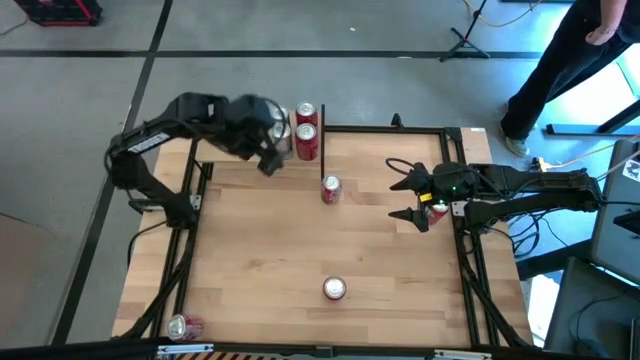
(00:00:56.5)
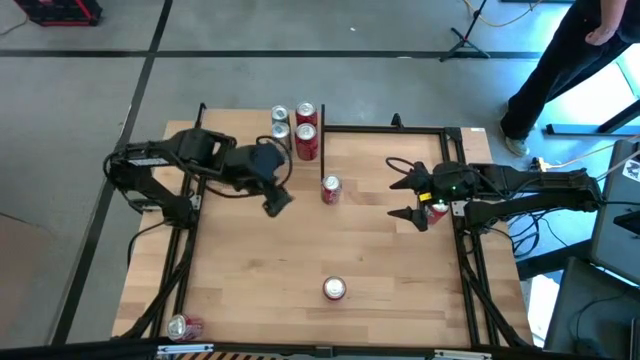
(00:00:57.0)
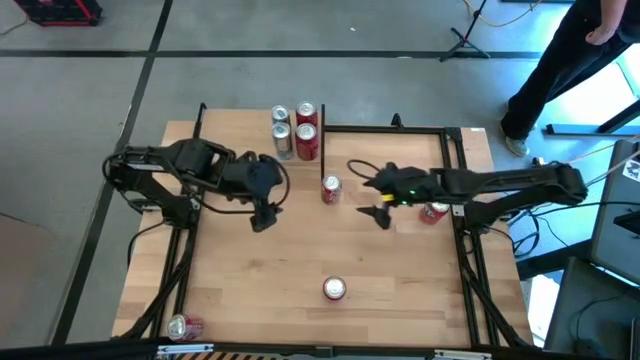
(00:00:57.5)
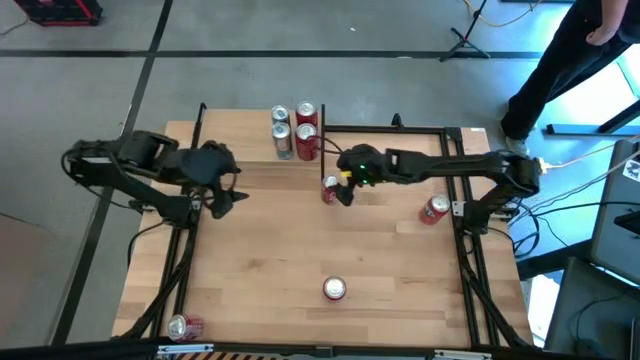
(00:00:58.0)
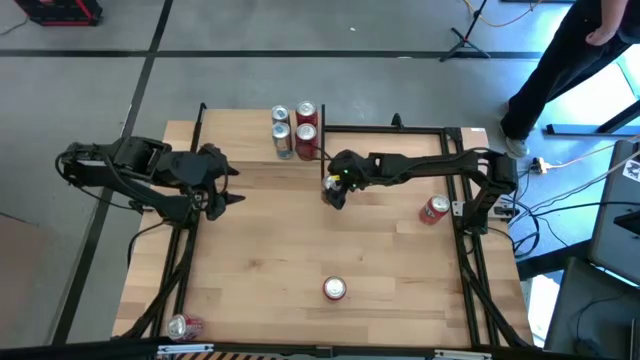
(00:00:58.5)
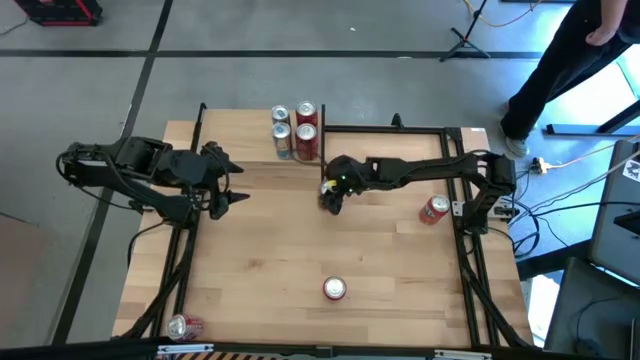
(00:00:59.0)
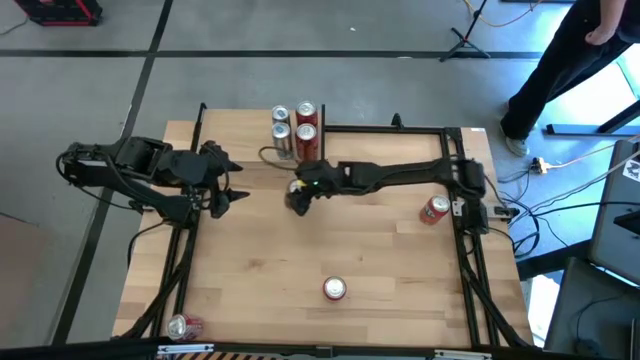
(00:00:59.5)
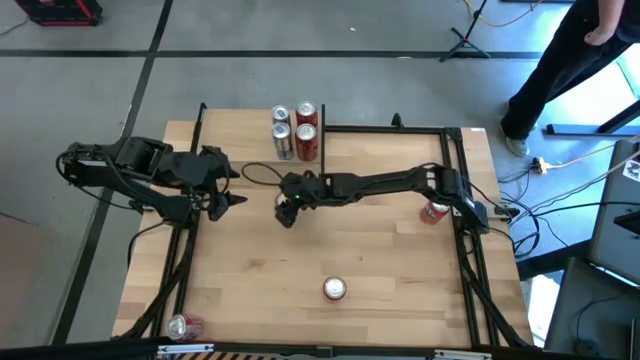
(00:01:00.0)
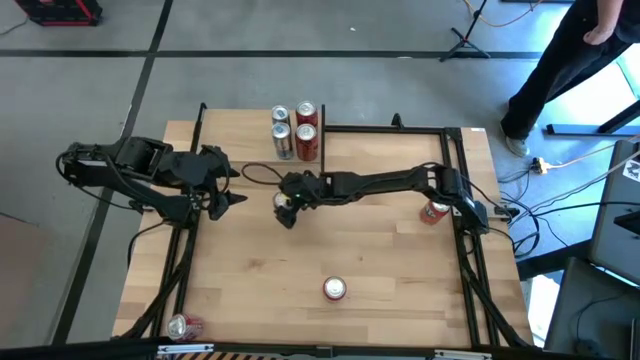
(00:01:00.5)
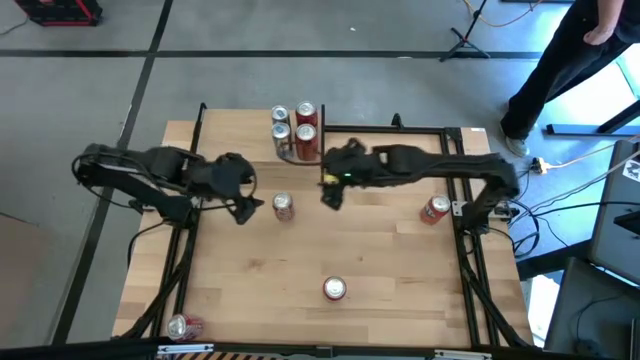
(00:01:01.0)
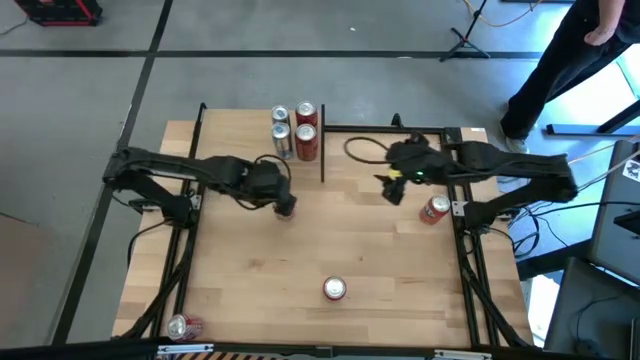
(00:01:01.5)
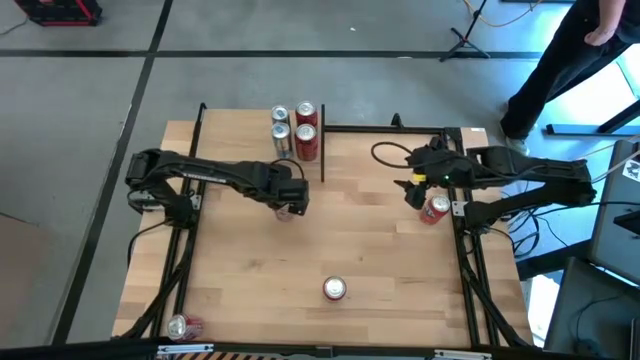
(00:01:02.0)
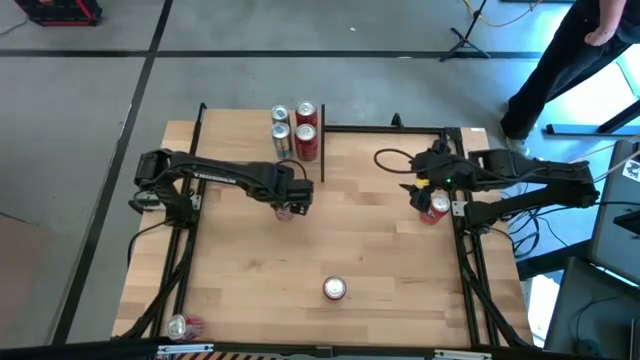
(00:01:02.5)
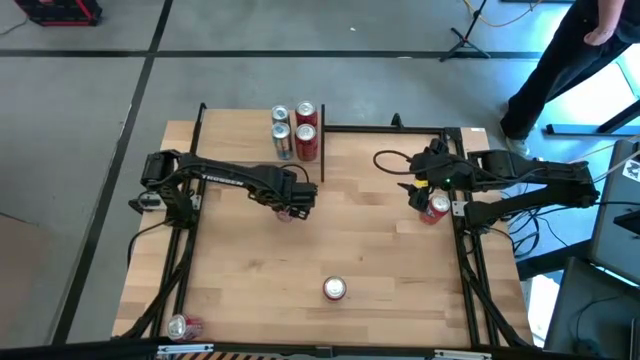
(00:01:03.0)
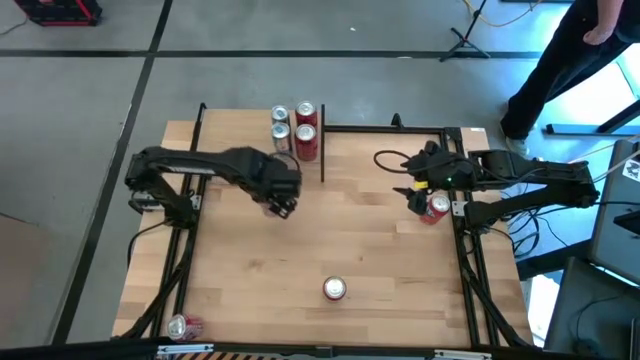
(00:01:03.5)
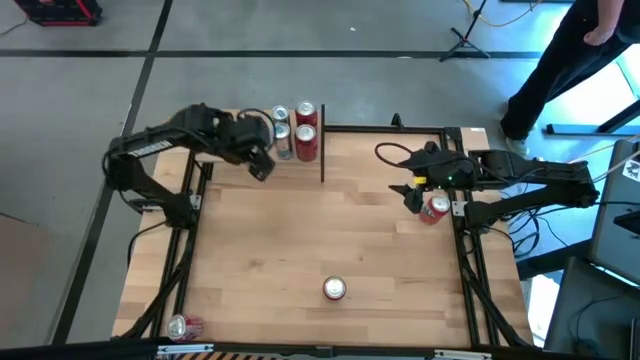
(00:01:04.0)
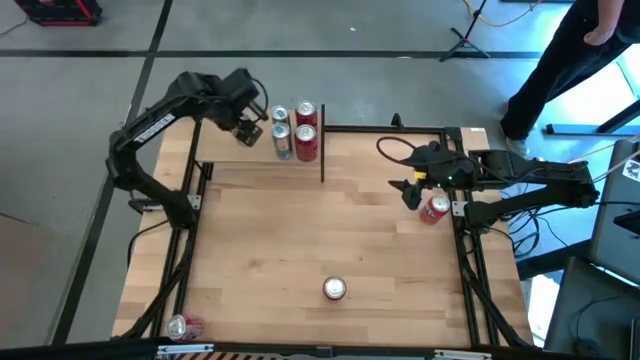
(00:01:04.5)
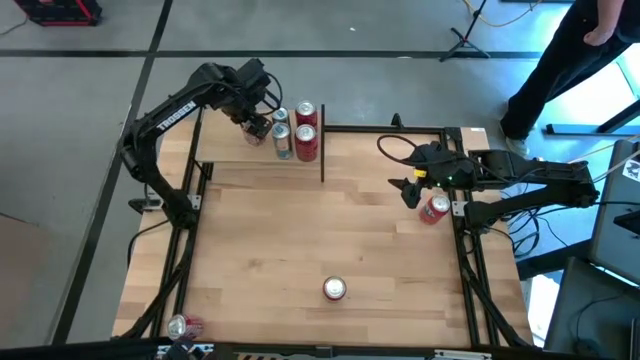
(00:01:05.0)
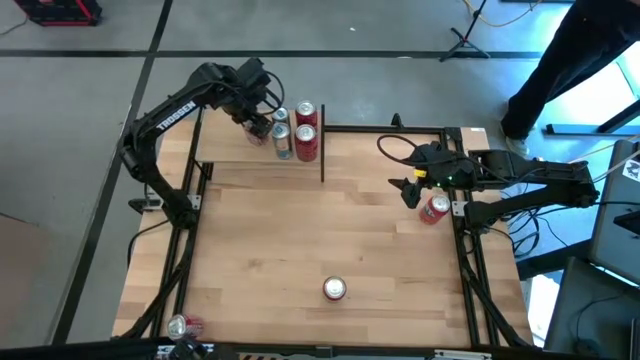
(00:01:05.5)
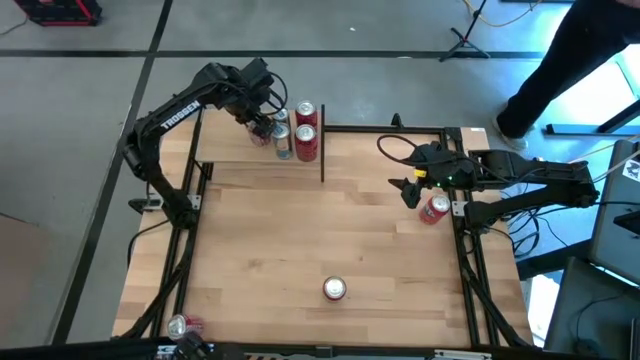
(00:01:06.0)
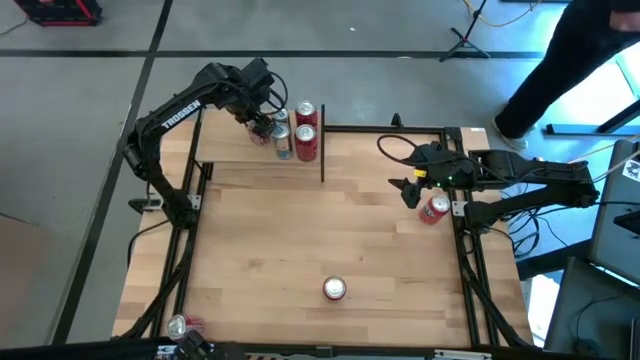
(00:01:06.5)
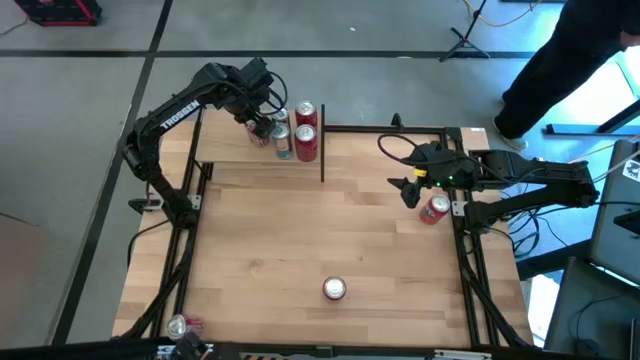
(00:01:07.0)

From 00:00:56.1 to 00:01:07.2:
Task: Place canned beverage on shelf
Put the red-white soda can on the shelf

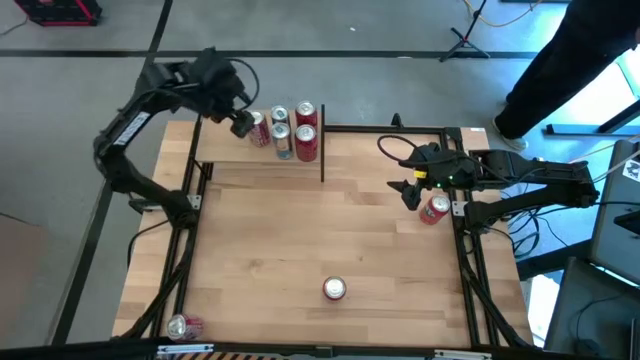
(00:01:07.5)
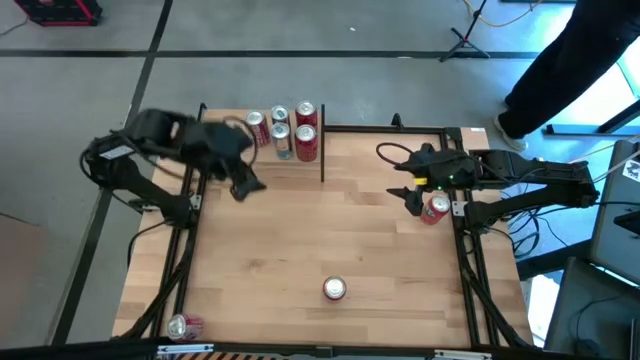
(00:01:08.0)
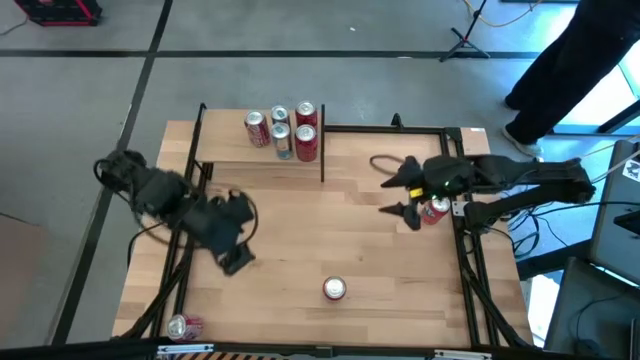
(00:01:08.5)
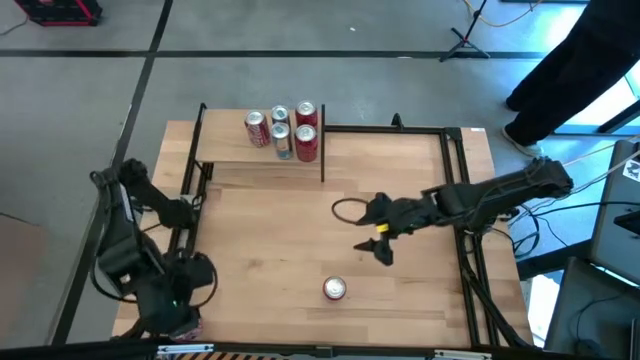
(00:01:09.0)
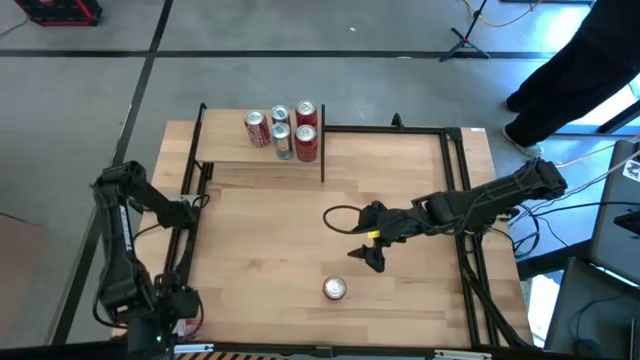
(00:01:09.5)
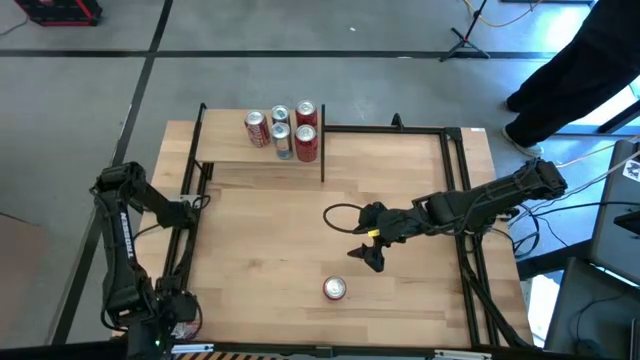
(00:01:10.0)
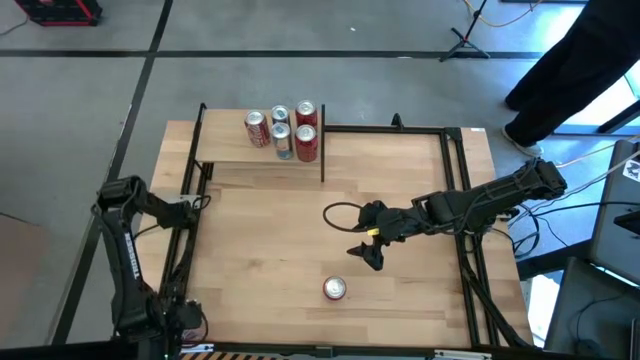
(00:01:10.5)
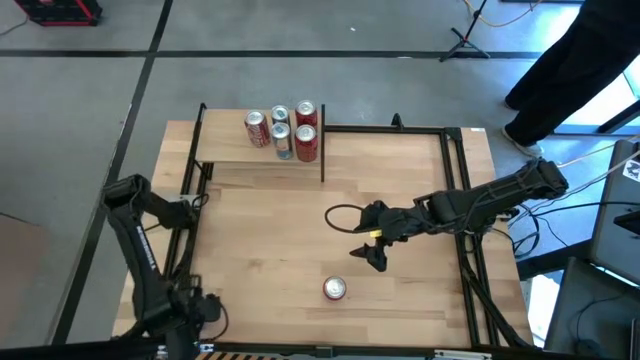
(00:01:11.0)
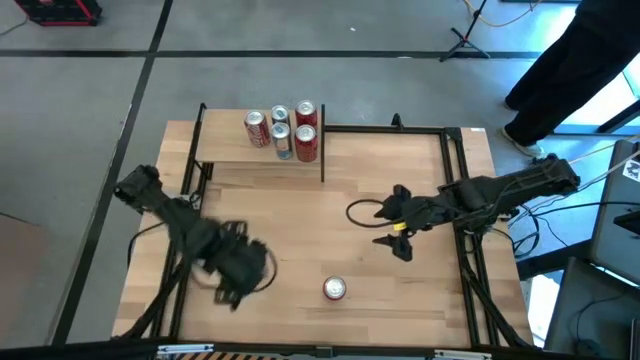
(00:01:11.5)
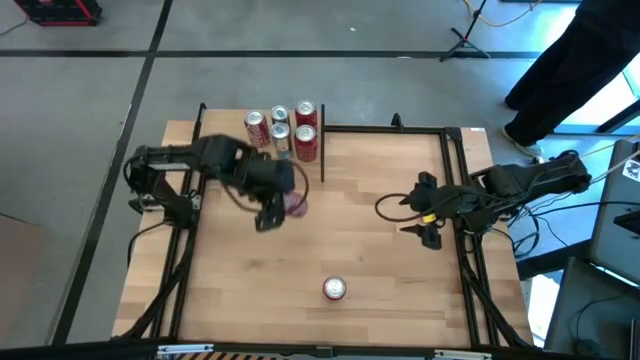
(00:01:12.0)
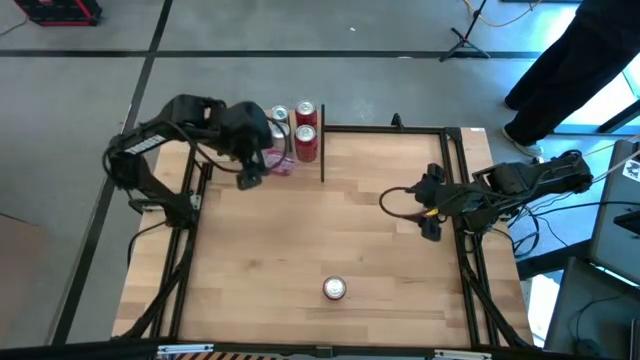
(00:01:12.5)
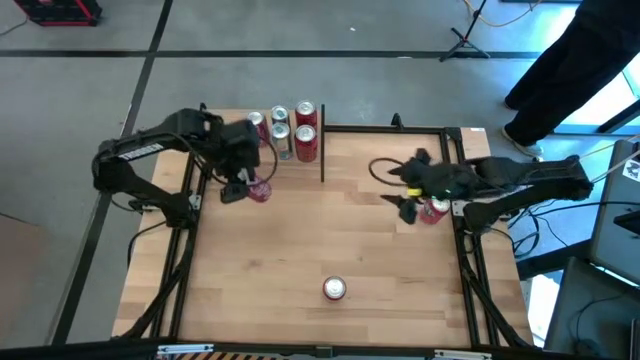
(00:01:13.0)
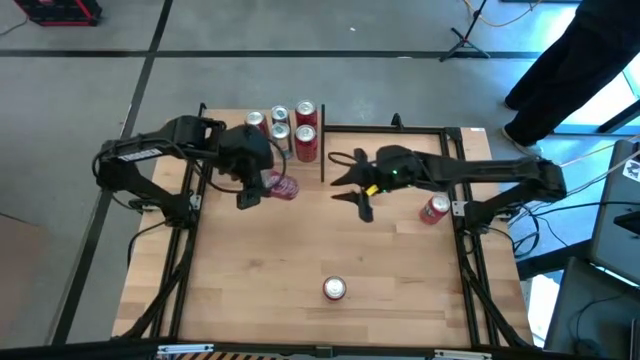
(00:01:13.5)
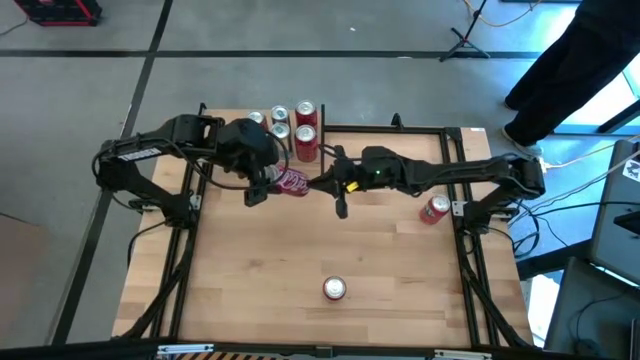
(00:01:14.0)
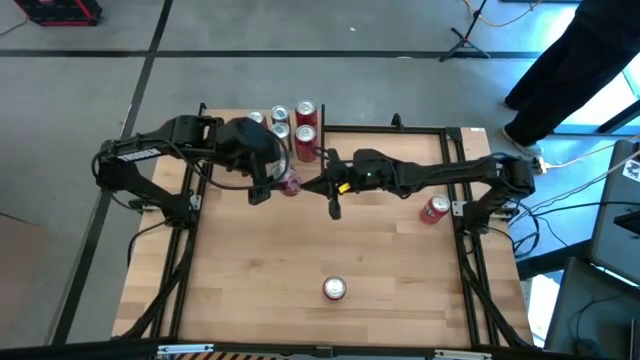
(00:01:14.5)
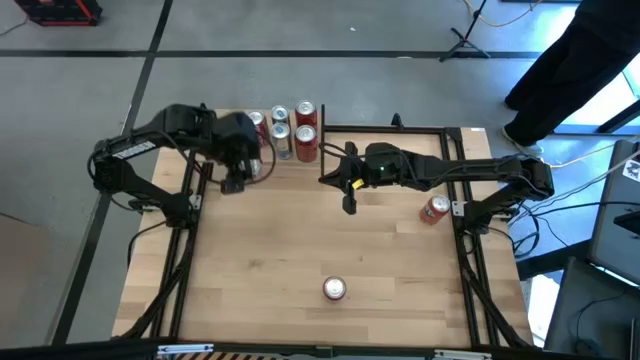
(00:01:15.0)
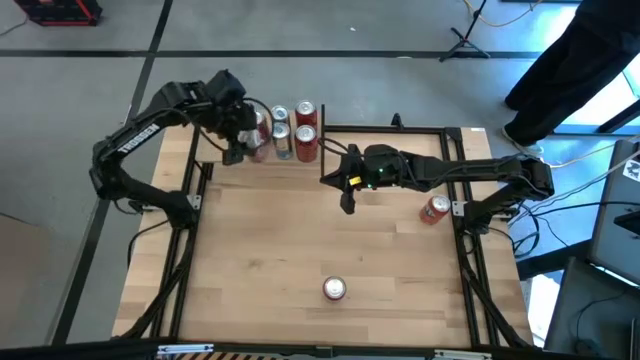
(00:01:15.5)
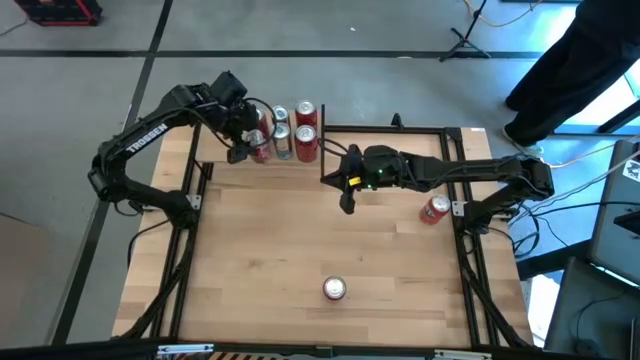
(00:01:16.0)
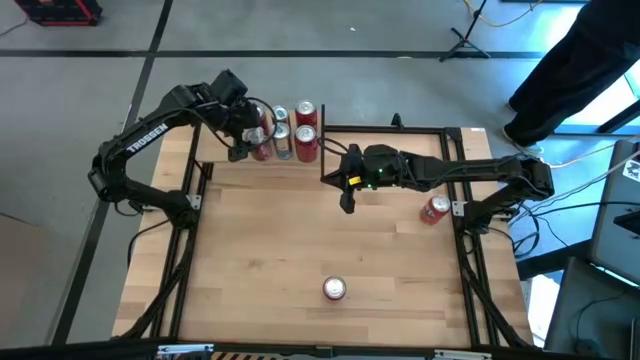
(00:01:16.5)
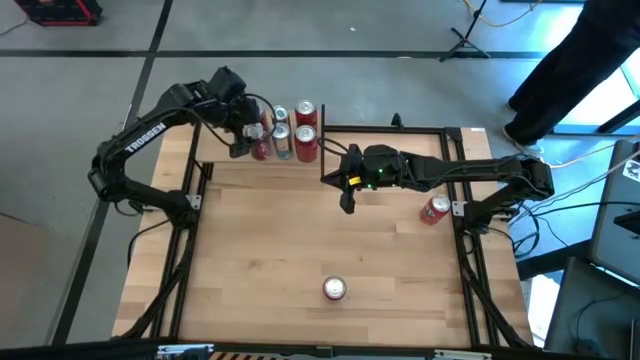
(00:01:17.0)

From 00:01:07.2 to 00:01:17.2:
Put the red-white soda can on the shelf and aligned with the other red-white soda can
